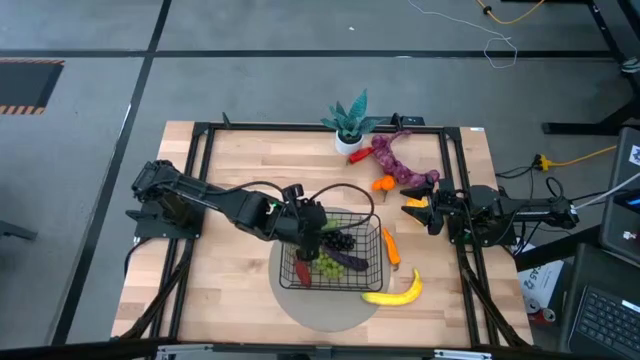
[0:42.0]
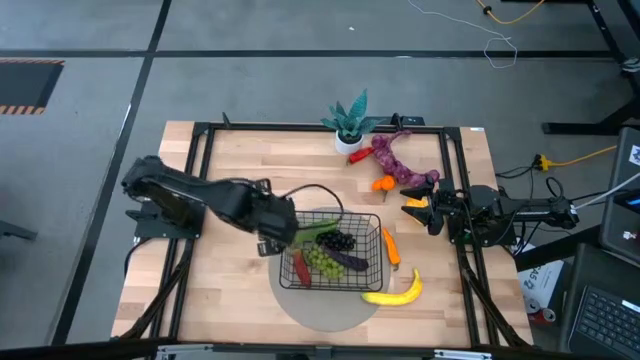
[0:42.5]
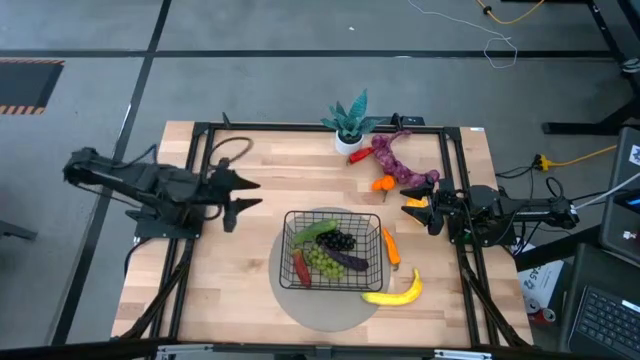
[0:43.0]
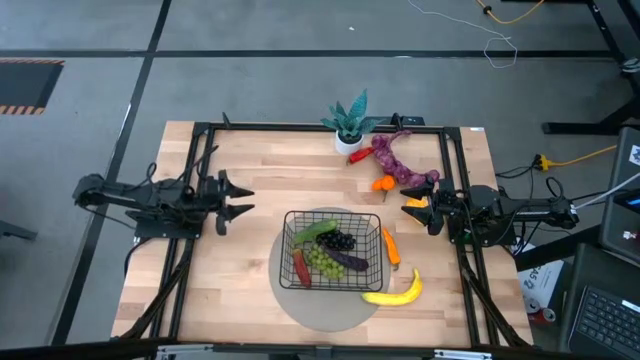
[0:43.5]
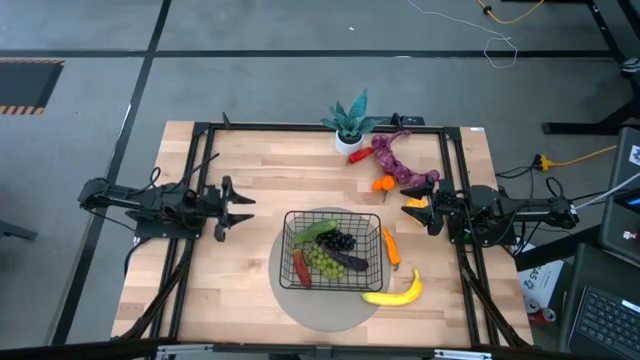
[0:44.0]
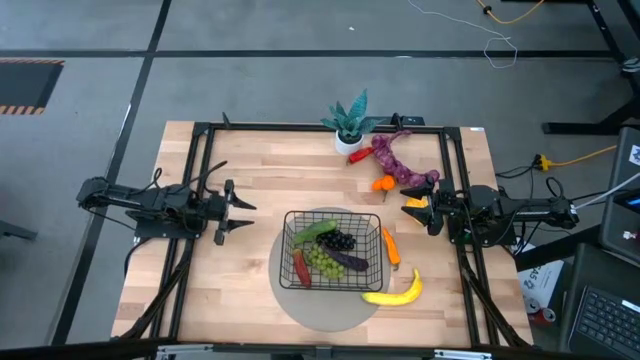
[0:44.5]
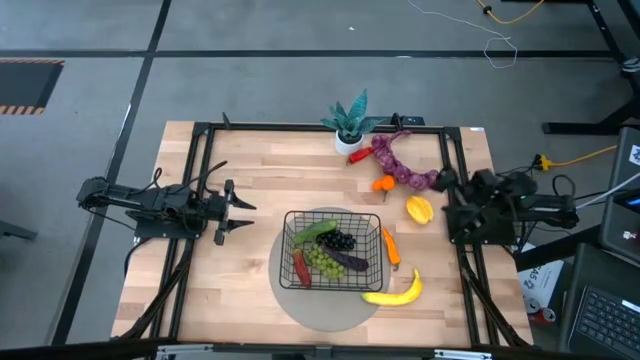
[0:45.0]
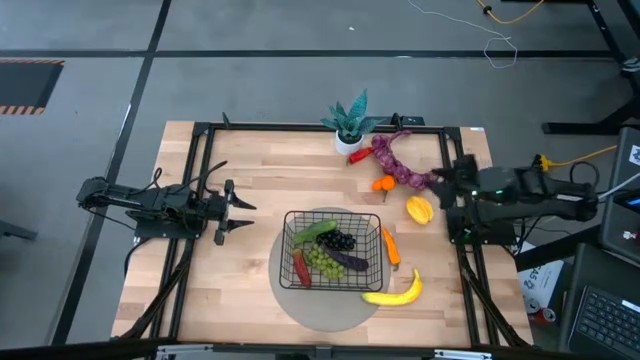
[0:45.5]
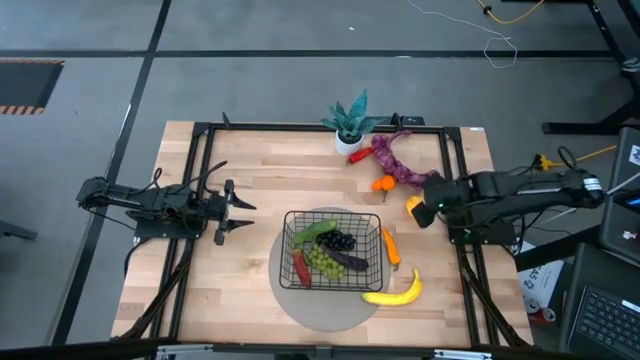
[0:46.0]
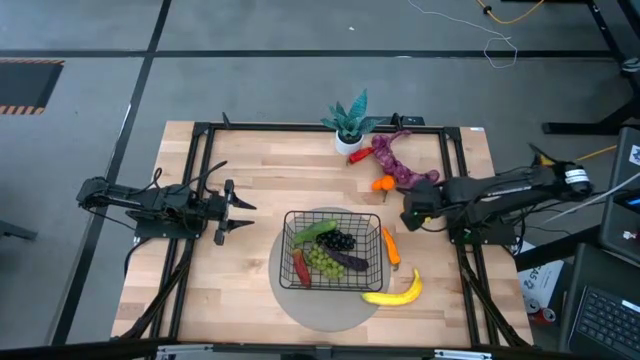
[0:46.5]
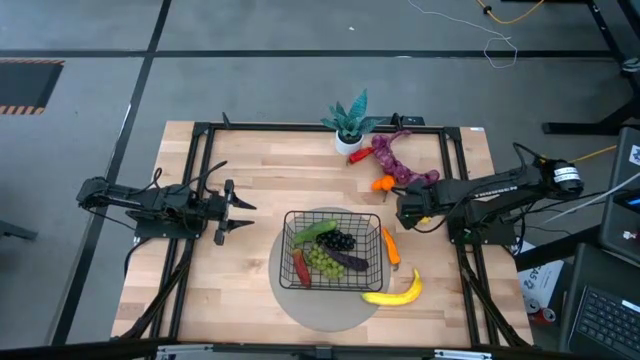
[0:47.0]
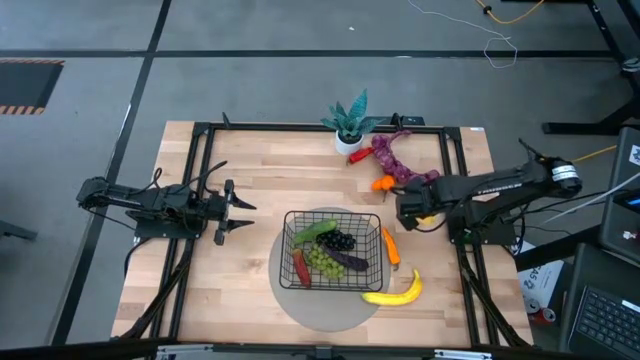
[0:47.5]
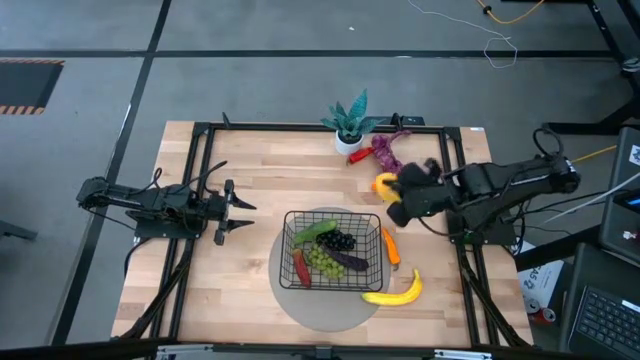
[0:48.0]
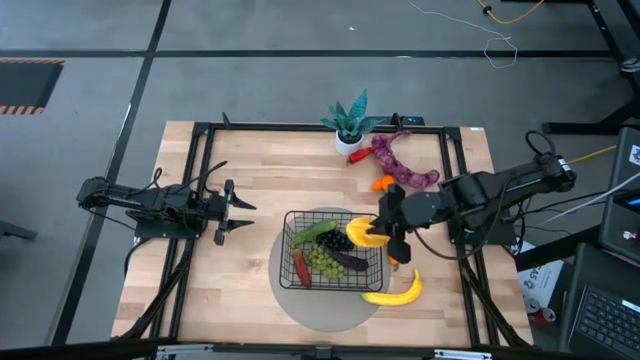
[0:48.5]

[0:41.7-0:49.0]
Task: Build produce basket
Put the yellow starfruit into the black wire basket

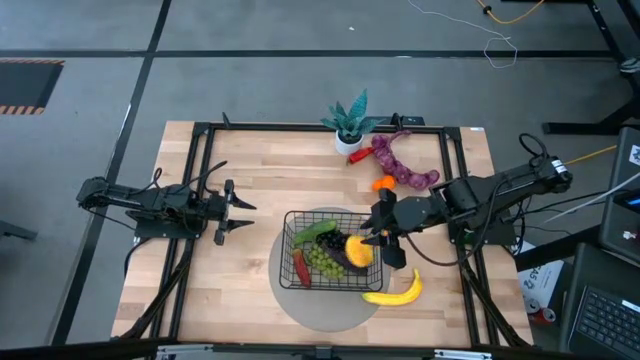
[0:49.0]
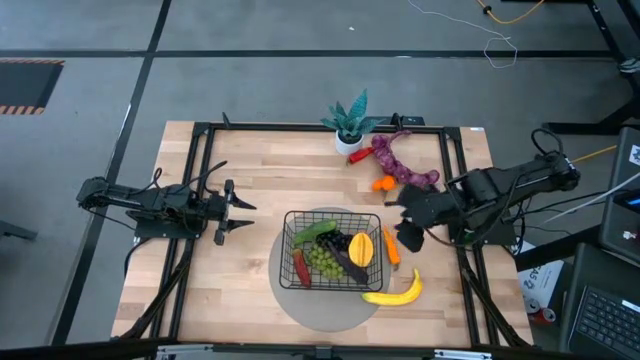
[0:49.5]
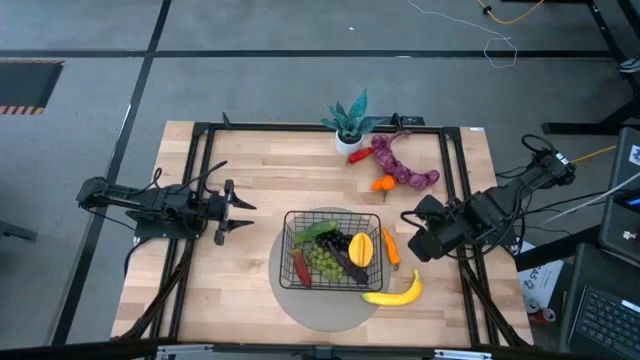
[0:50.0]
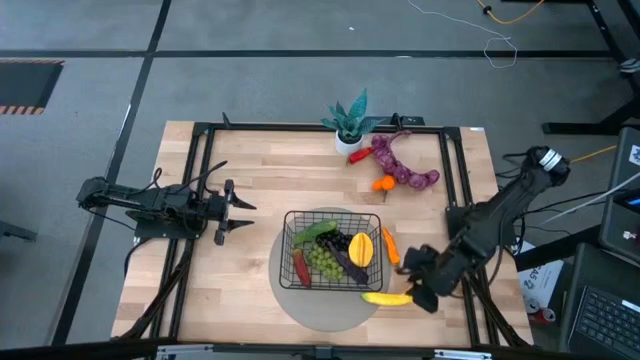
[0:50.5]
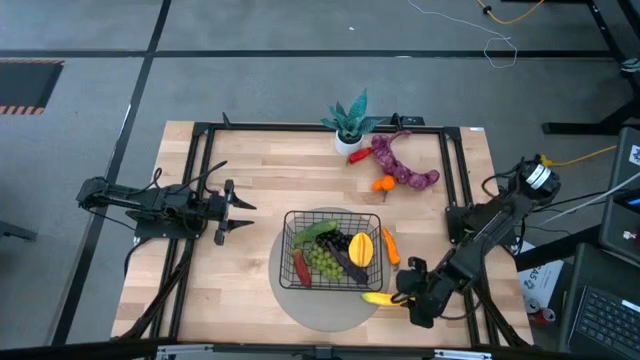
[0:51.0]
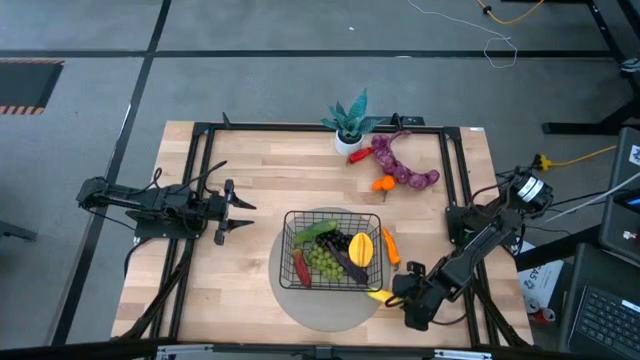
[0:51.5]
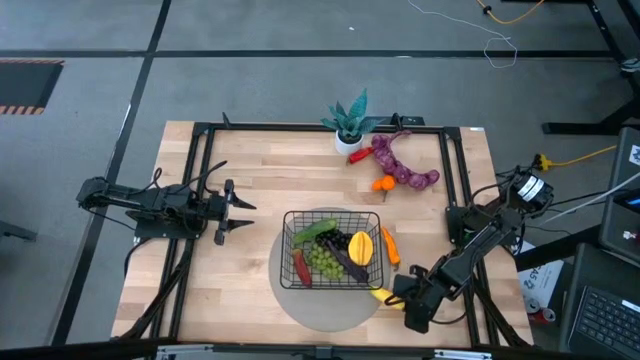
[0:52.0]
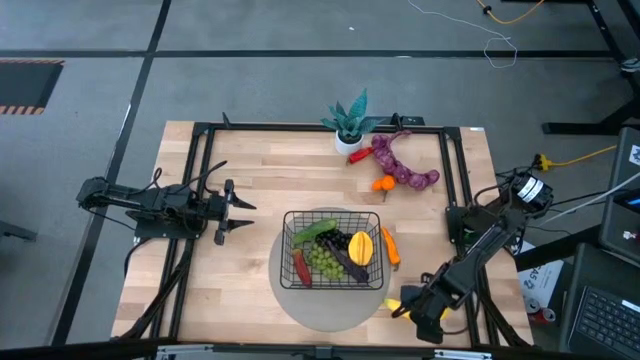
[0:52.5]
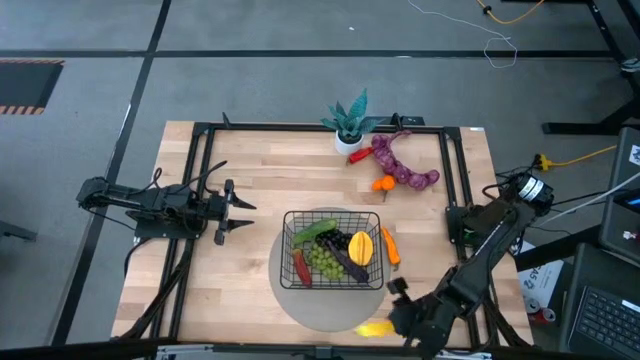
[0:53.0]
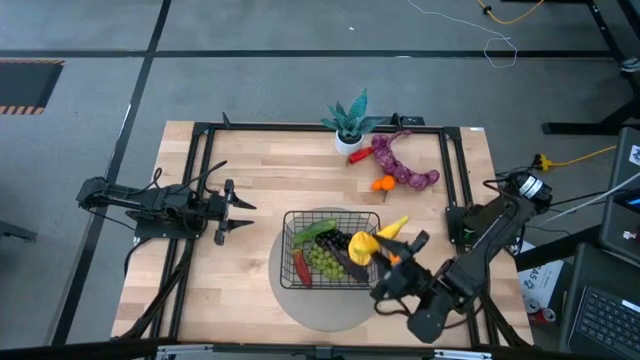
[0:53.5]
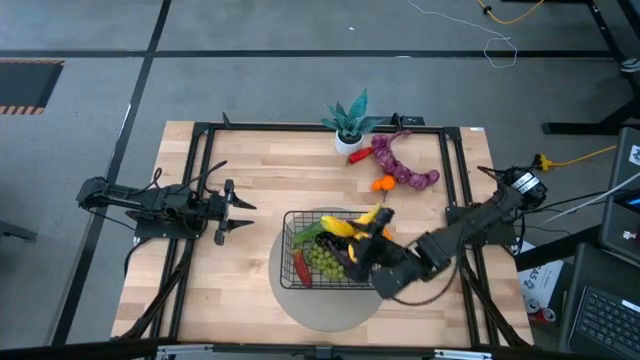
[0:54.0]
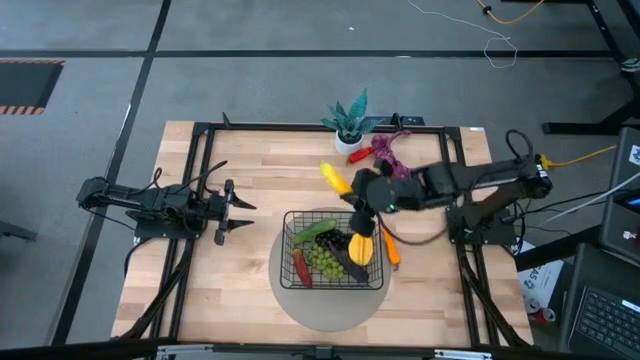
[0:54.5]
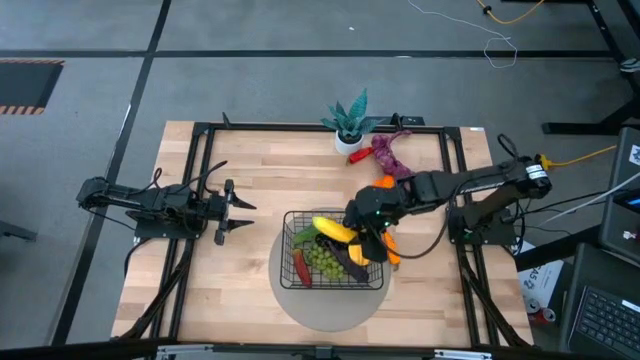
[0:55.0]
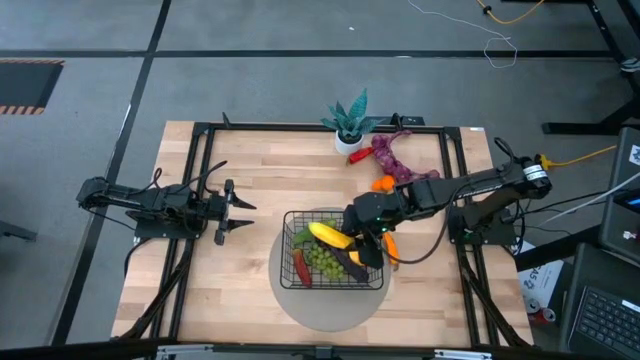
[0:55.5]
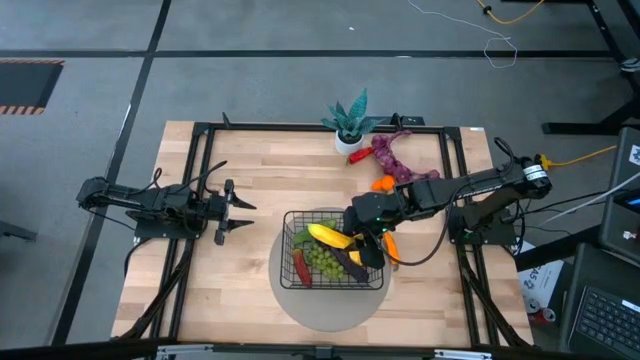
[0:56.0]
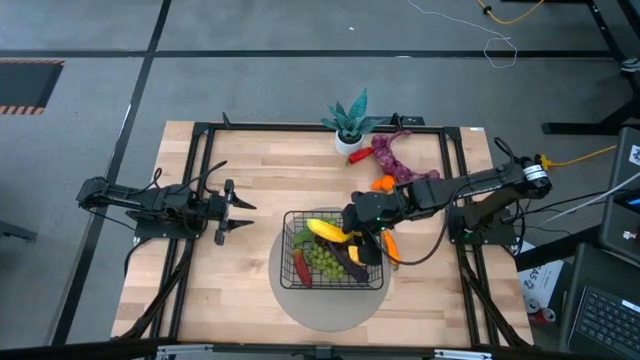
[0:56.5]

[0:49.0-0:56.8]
Put the yellow banana into the black wire basket

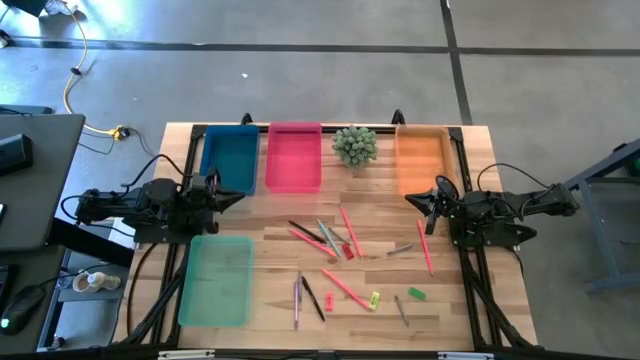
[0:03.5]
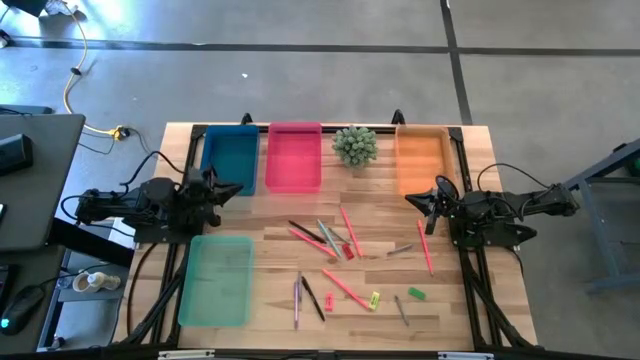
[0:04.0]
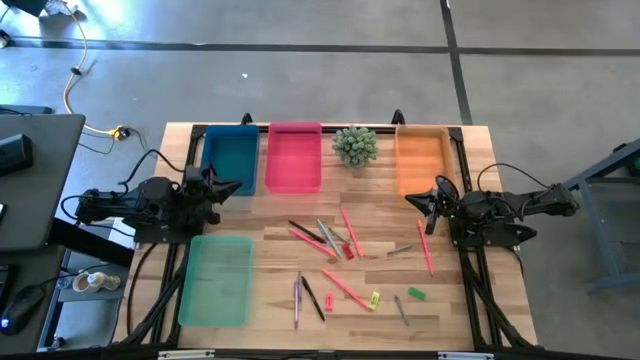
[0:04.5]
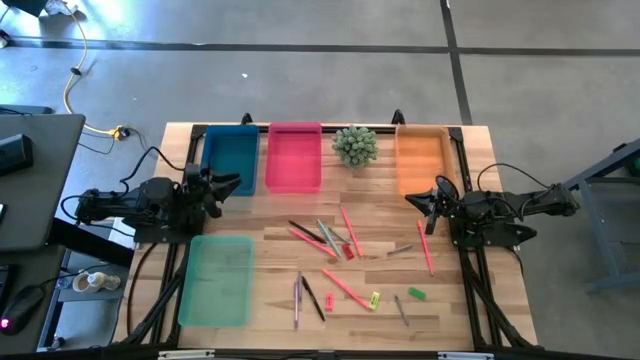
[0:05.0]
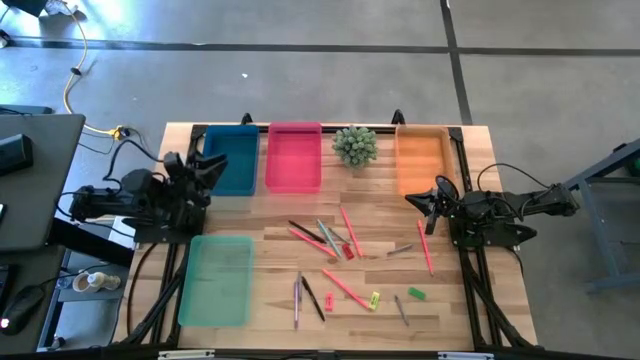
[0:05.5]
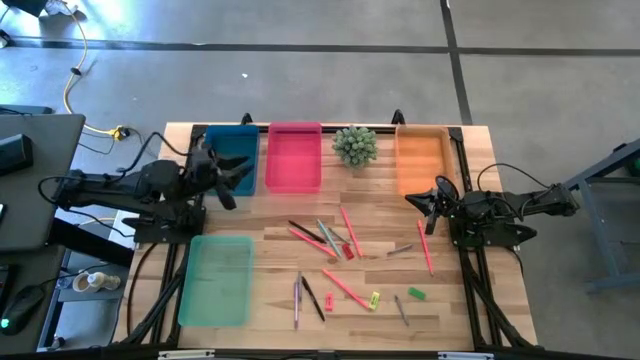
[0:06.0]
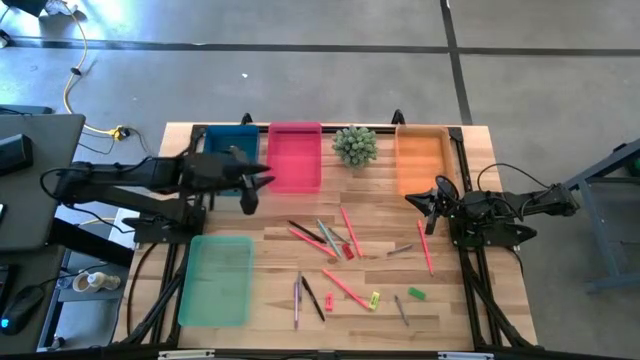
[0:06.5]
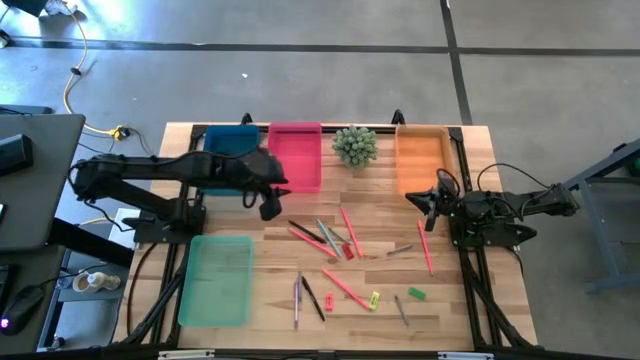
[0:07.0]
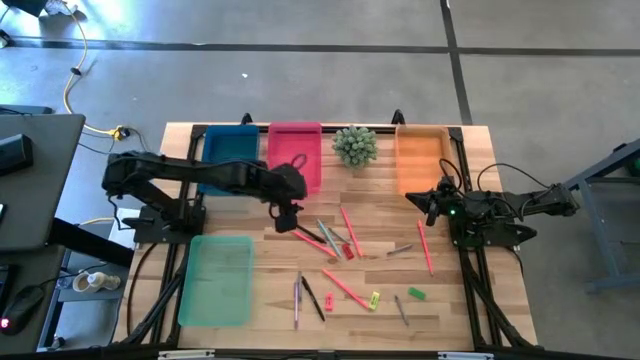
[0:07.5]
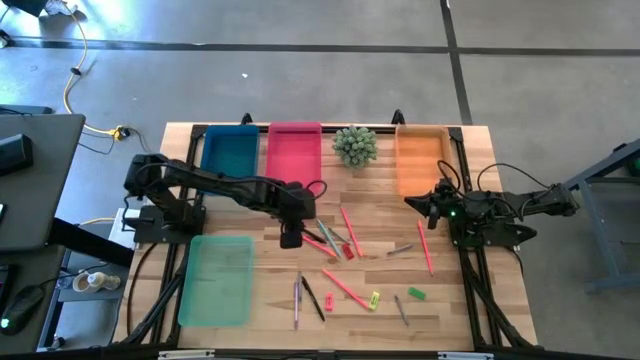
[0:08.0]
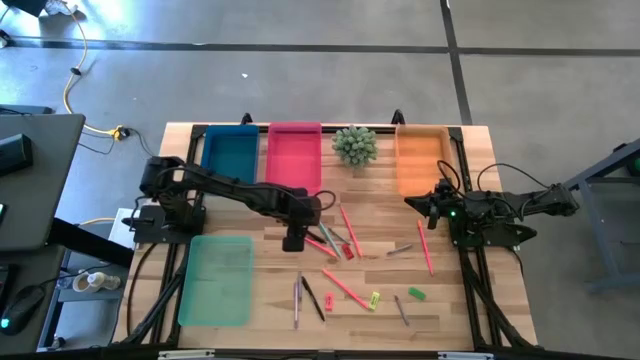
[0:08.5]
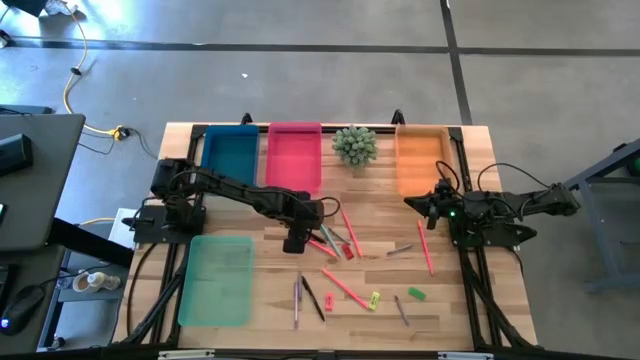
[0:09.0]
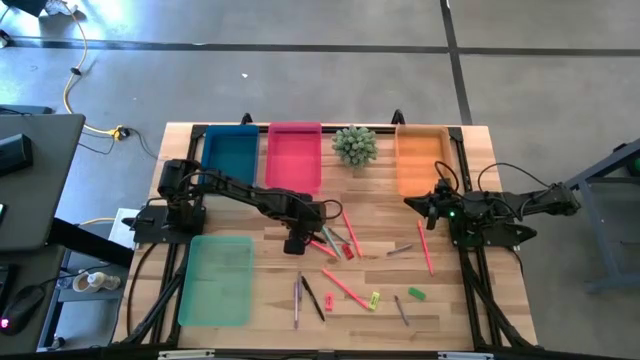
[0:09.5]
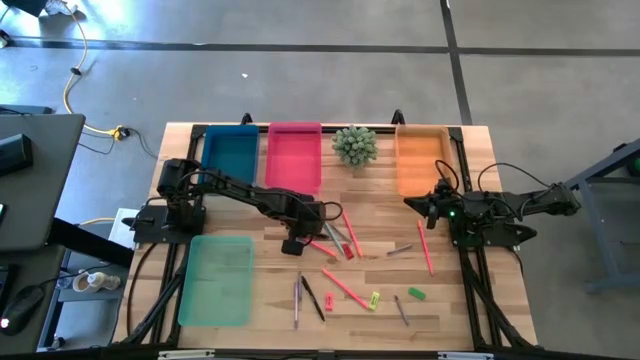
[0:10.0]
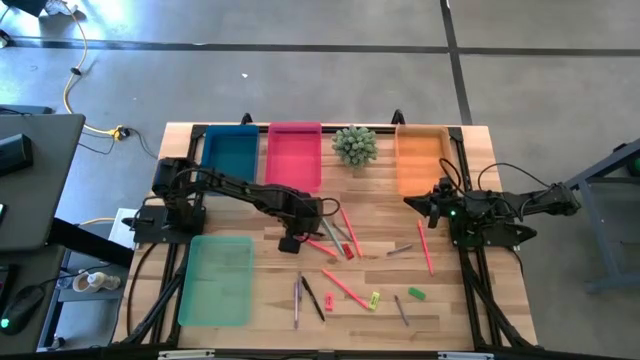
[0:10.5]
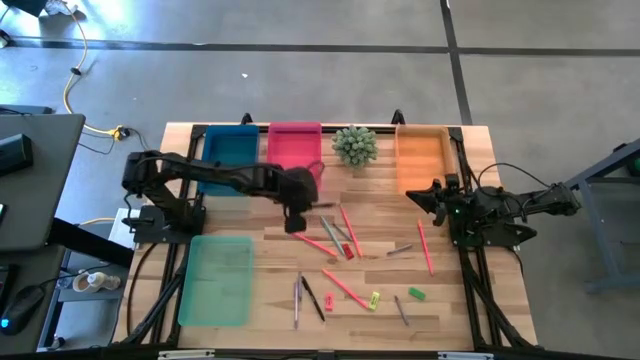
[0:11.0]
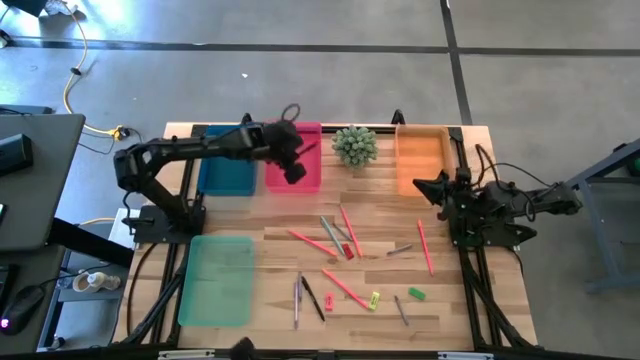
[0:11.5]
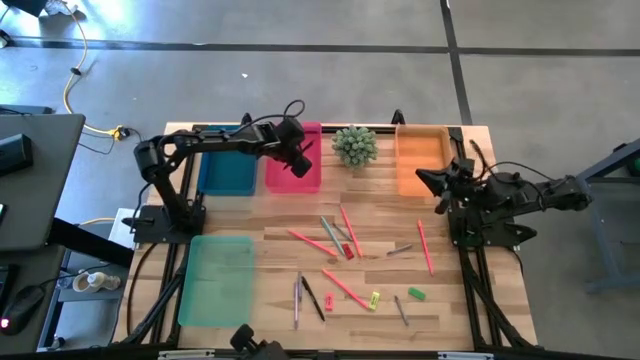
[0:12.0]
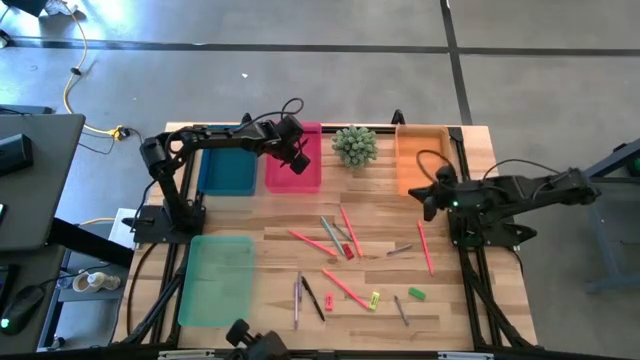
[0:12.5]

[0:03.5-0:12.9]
Task: Sort crayons/erasers/pens/pencils in bins
Put the black pen into the pink bin
